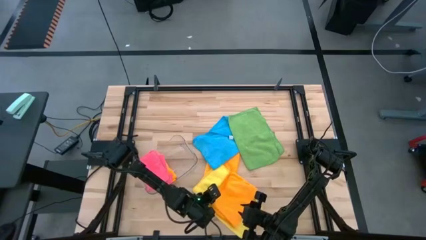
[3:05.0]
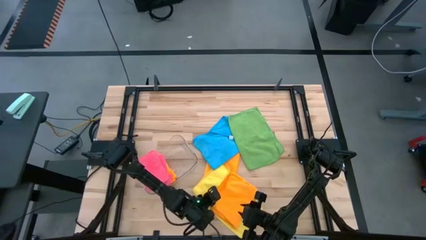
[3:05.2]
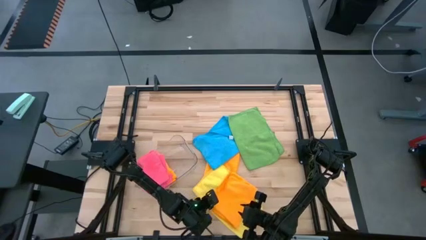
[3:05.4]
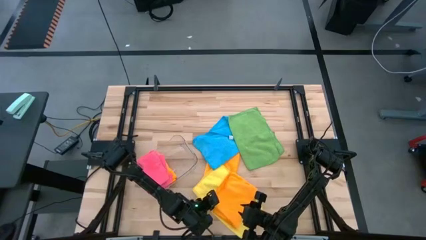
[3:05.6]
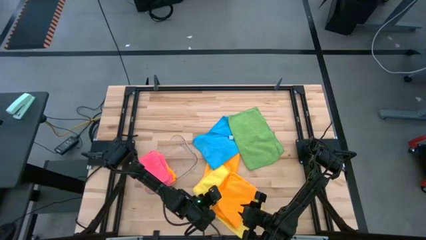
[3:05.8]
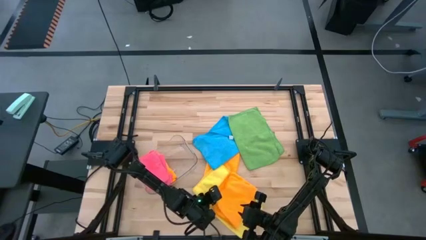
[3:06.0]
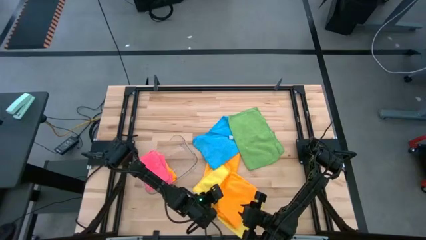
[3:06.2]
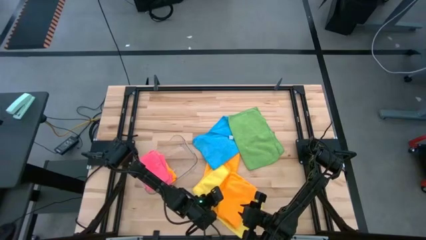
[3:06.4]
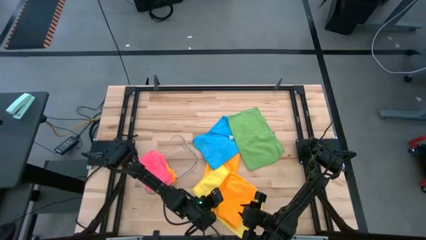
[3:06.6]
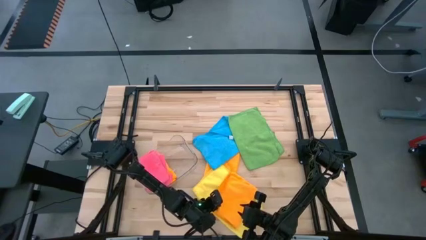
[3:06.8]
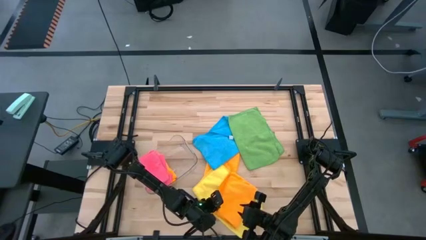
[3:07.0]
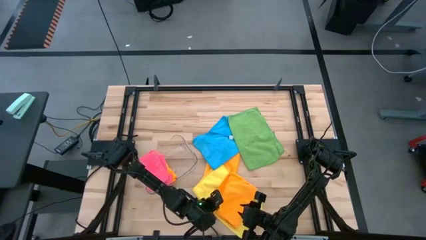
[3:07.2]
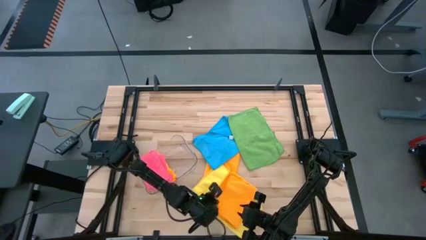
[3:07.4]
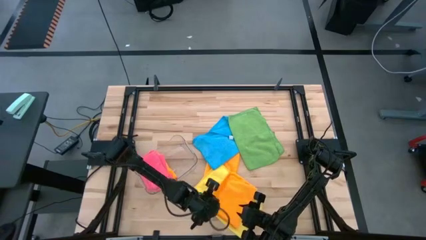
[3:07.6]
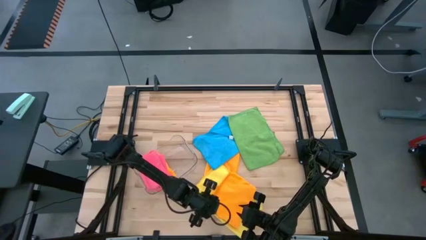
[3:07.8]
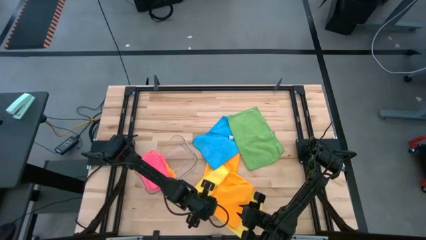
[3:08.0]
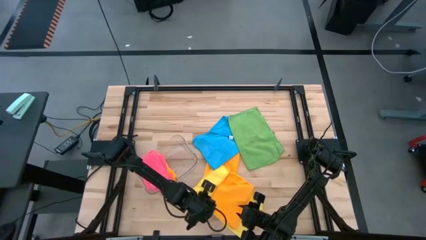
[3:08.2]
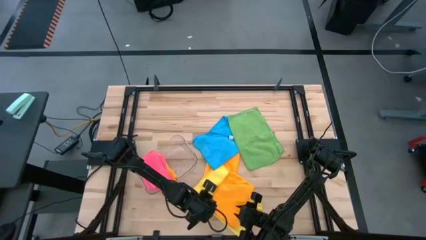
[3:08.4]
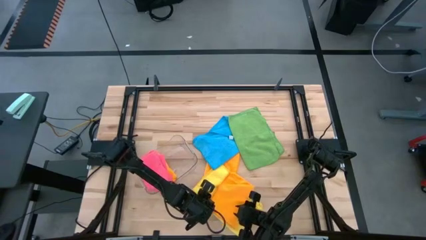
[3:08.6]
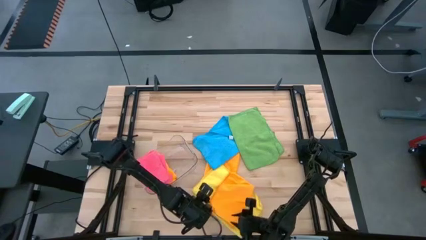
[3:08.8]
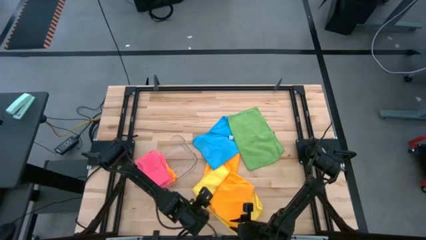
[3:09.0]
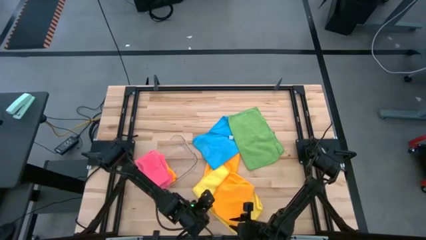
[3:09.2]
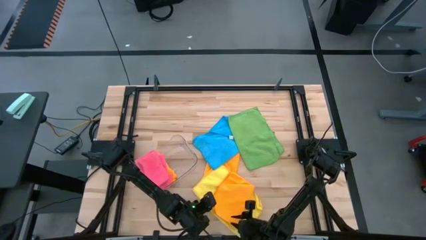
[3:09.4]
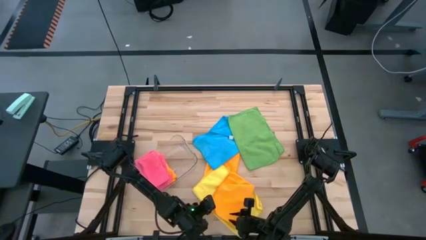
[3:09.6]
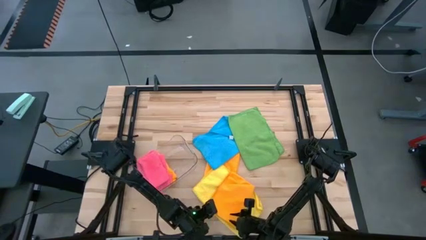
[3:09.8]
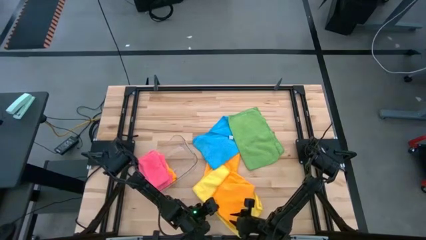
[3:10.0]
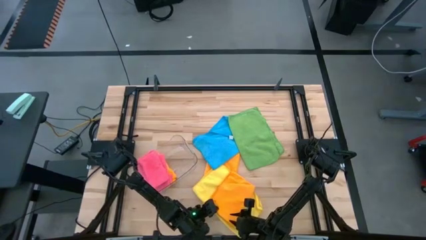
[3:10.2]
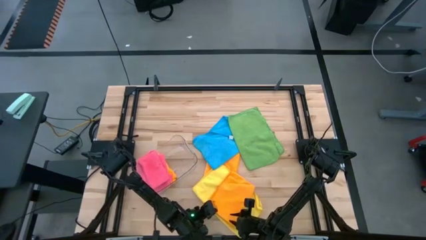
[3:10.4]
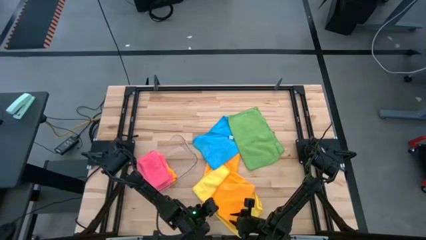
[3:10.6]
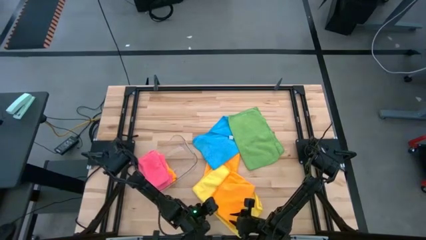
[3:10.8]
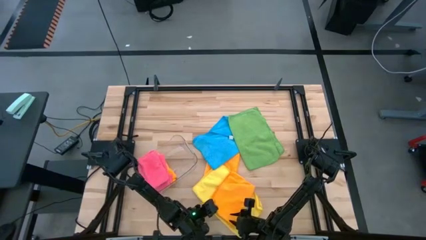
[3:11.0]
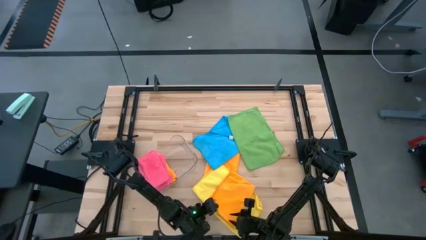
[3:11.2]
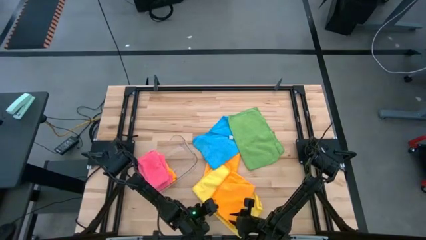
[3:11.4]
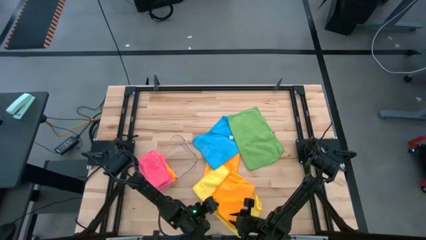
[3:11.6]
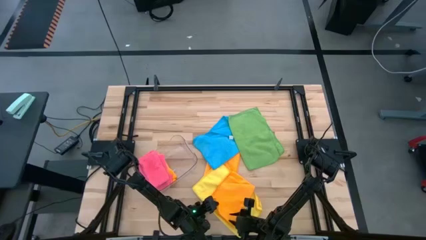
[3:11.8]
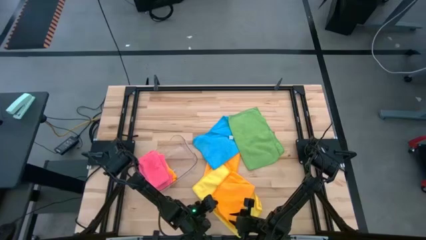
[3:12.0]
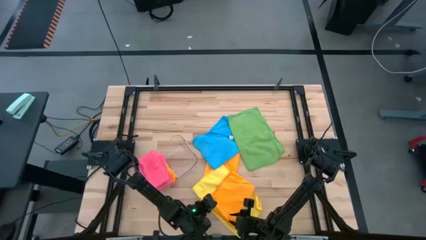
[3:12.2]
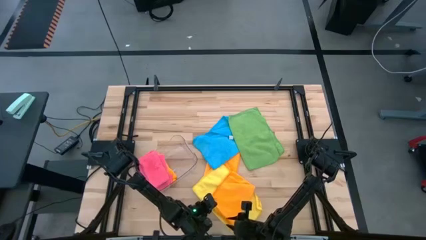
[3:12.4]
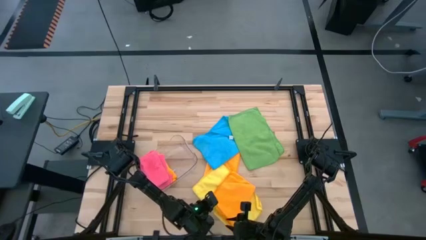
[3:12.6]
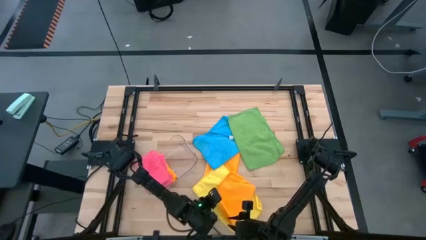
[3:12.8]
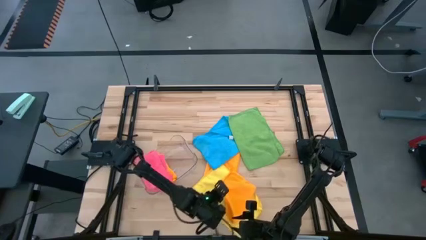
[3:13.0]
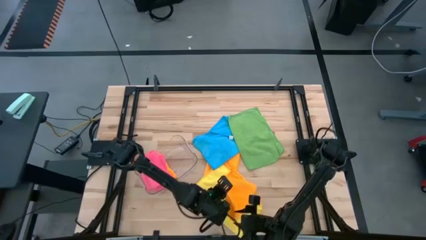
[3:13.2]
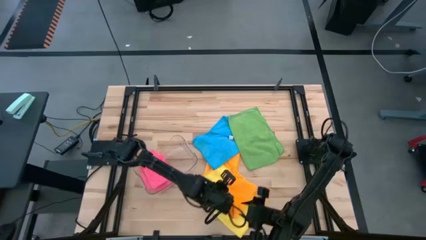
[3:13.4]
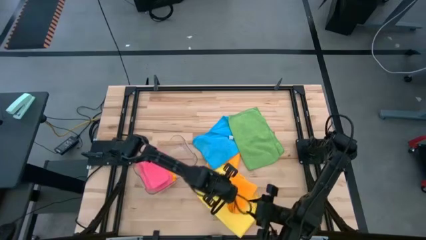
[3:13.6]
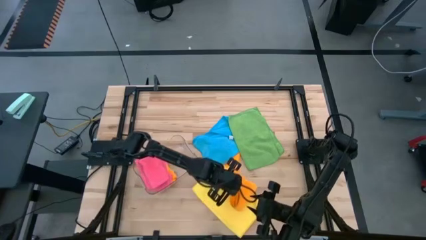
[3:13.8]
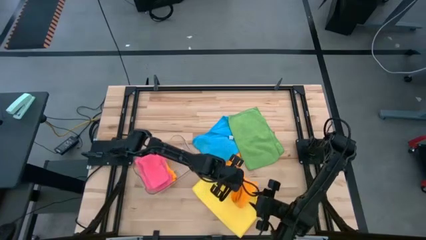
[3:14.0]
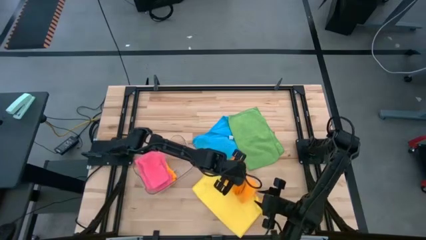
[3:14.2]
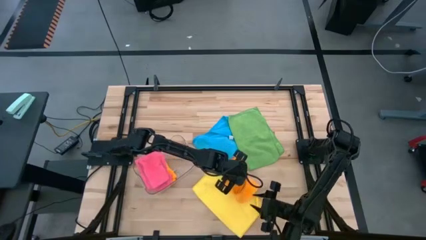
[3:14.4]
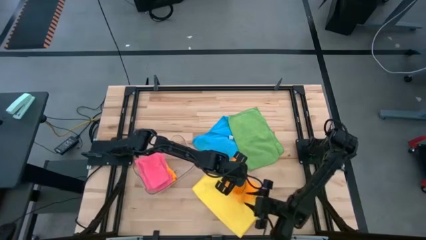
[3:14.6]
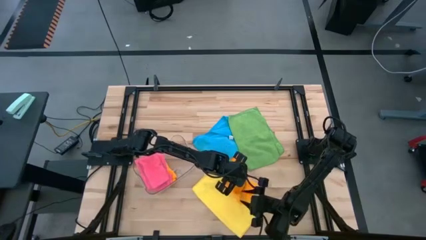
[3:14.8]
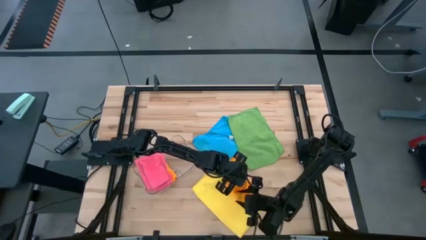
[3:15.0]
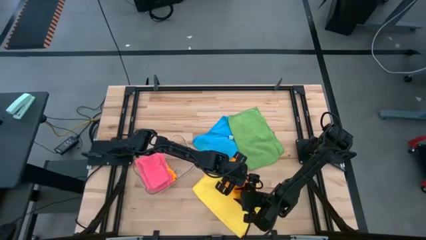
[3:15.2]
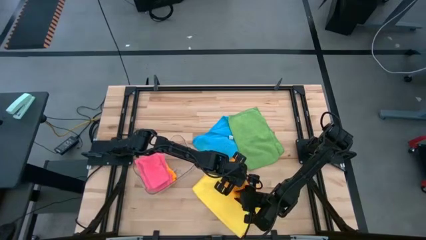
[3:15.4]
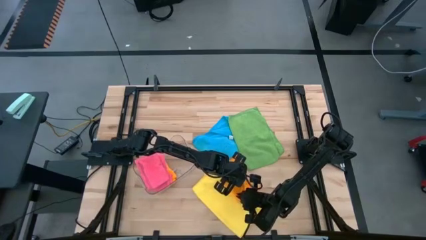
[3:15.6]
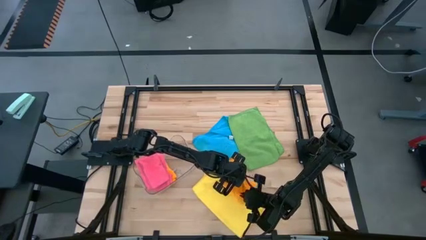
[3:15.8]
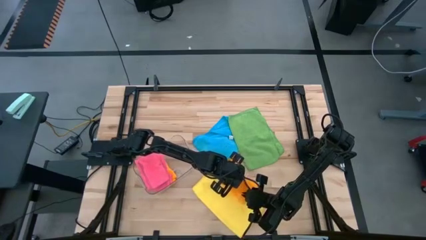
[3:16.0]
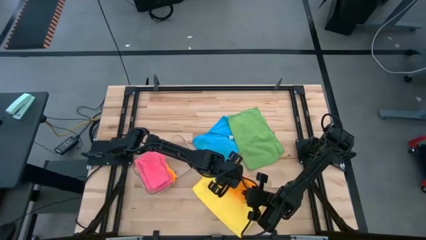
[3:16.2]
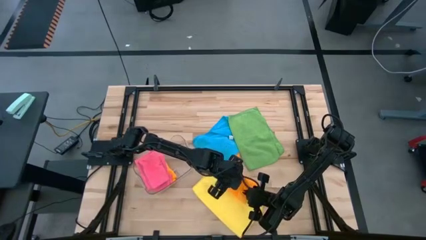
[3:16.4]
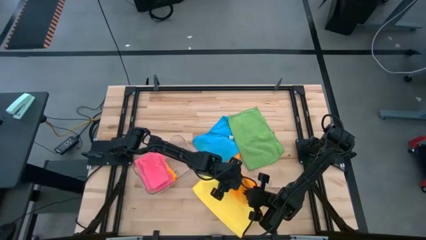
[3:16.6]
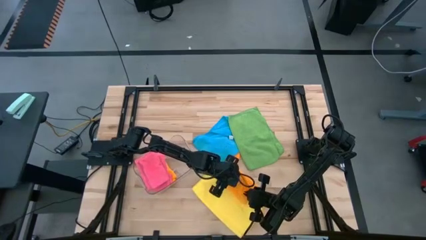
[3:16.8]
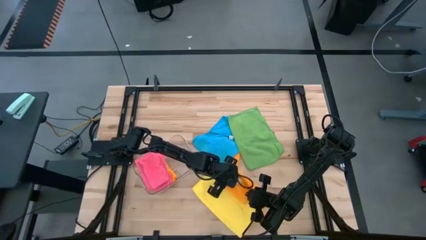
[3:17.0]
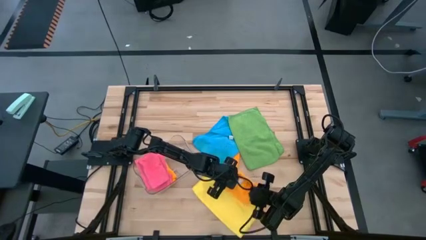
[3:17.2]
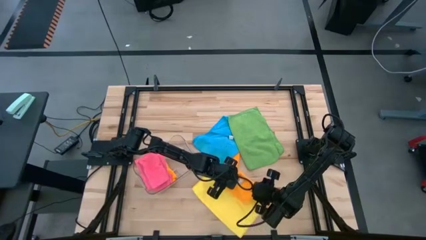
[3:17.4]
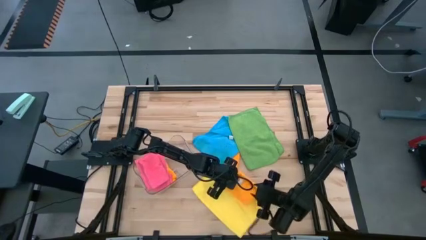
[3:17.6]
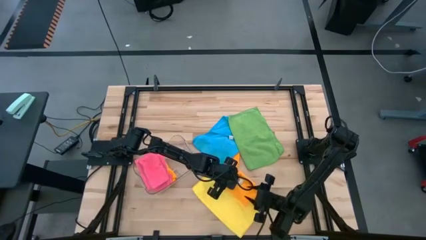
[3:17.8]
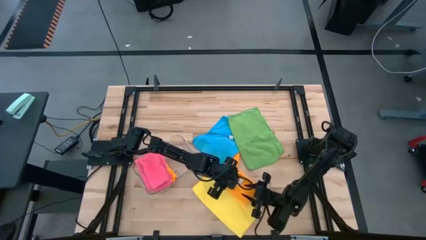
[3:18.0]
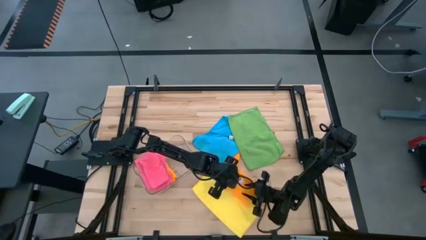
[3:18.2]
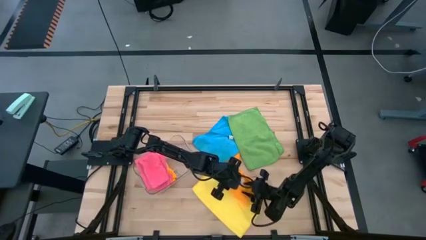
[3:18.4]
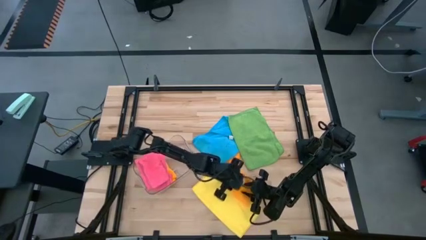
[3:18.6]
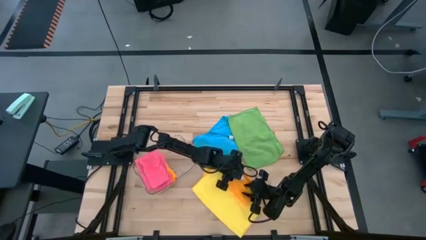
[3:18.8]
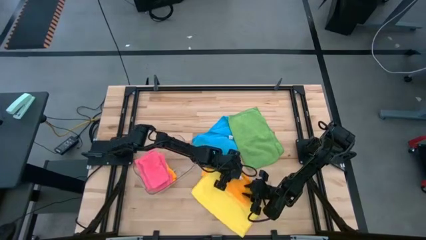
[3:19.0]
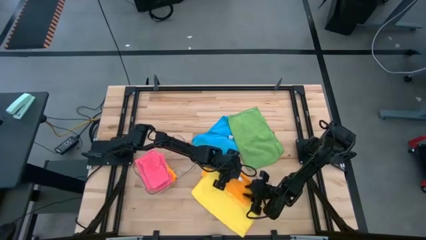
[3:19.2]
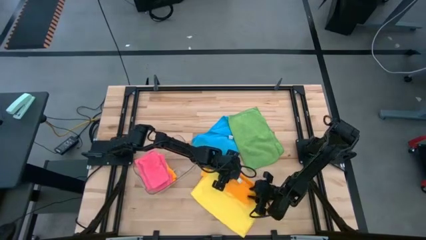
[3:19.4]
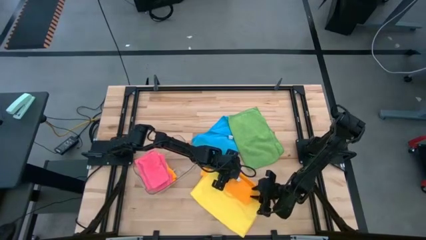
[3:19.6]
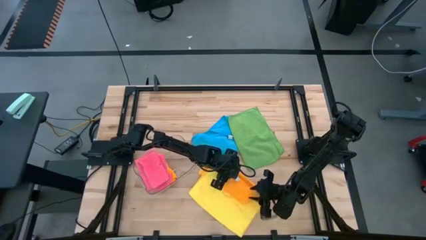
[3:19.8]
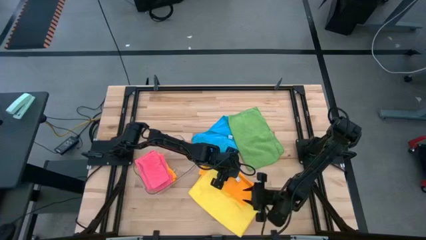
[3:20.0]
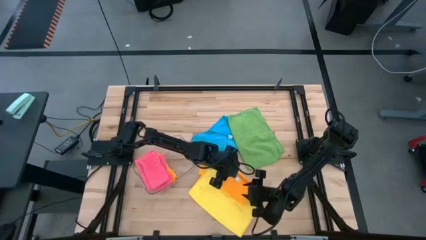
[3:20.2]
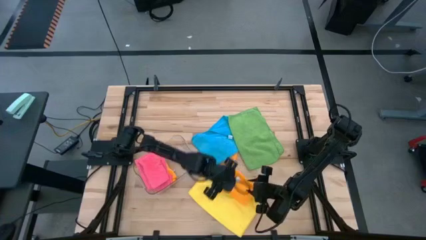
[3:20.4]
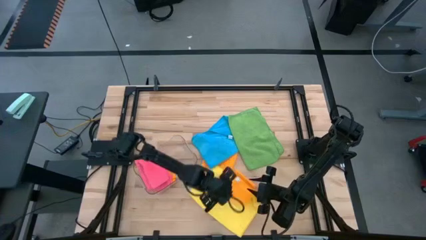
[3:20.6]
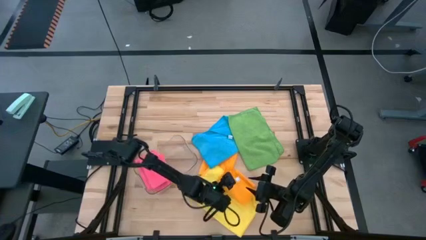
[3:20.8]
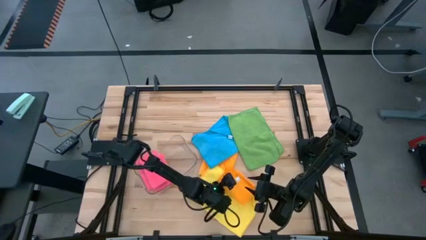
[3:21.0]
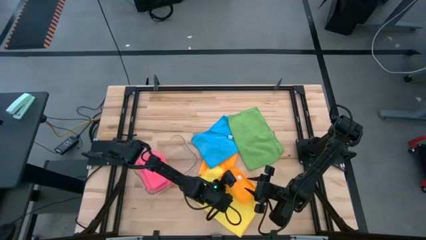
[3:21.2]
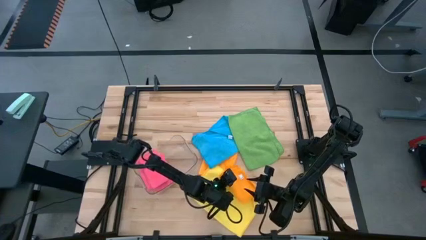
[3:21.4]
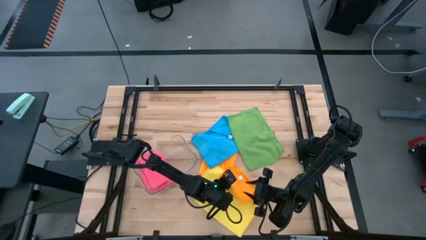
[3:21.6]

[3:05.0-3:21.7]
Task: Fold microfiber towels
Fold the right orange microfiber cloth and put it into the transparent bin
